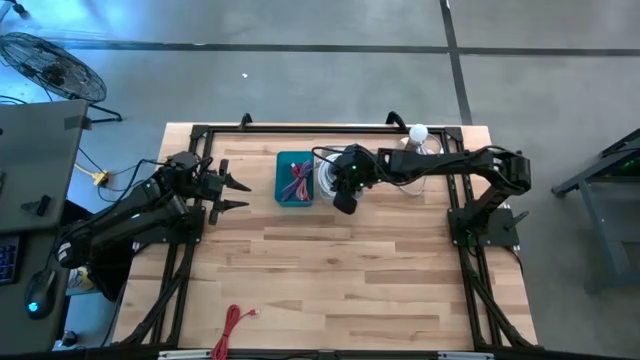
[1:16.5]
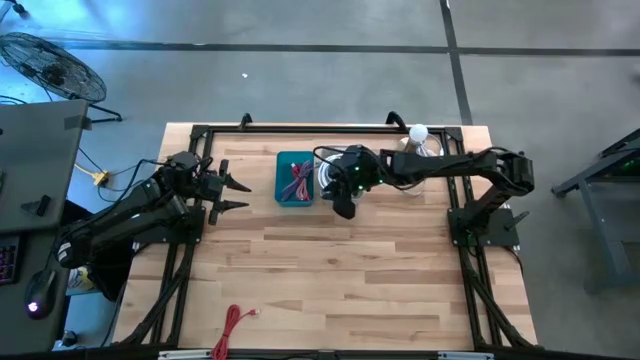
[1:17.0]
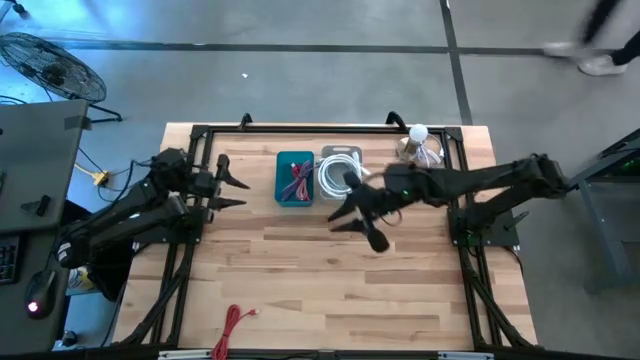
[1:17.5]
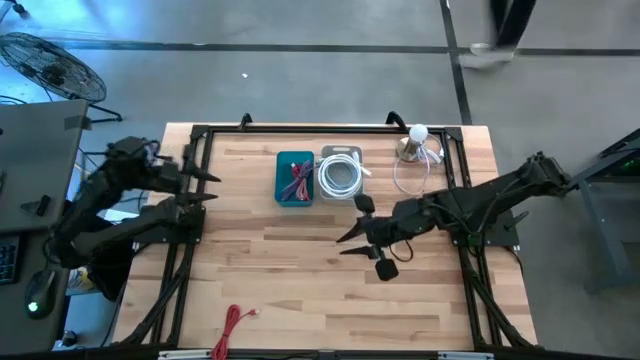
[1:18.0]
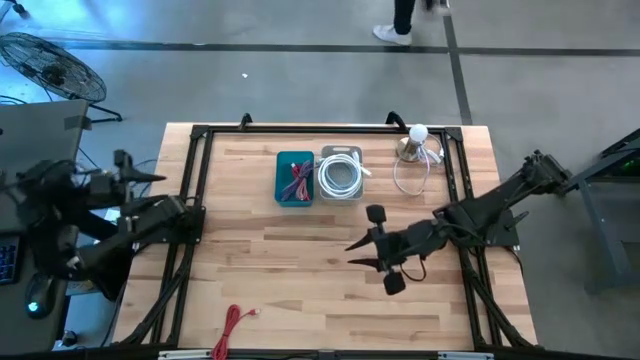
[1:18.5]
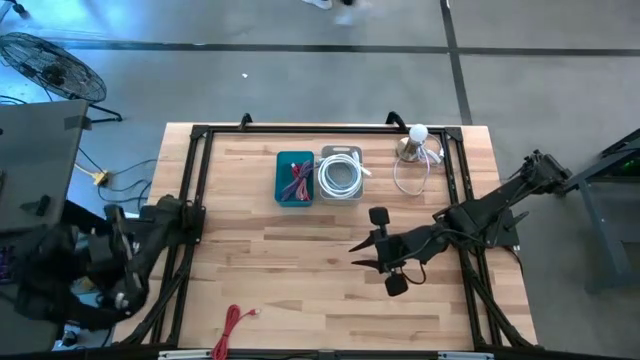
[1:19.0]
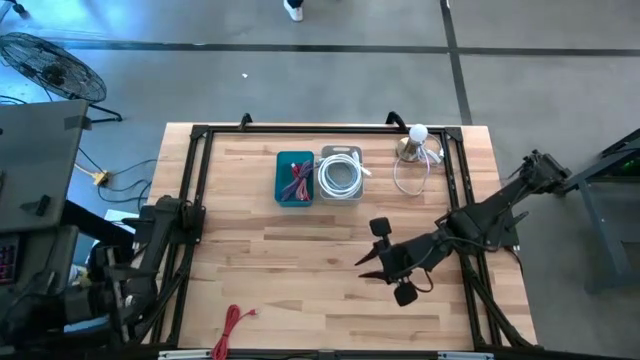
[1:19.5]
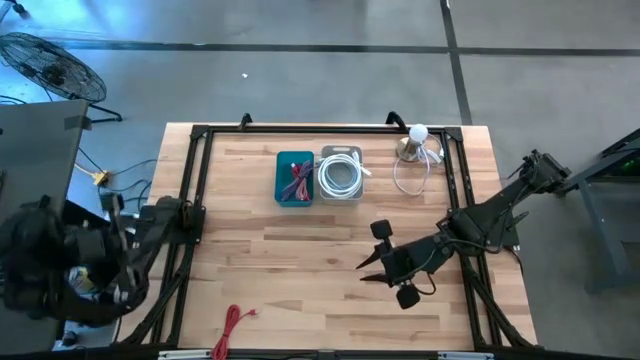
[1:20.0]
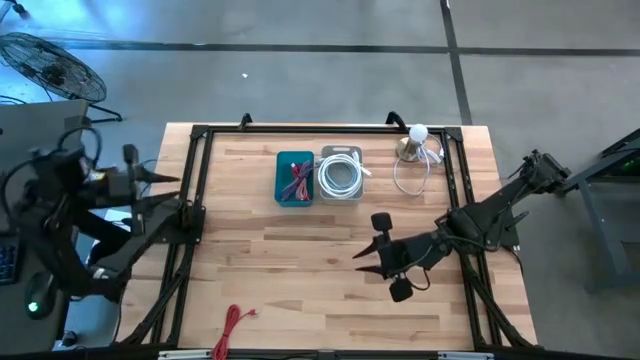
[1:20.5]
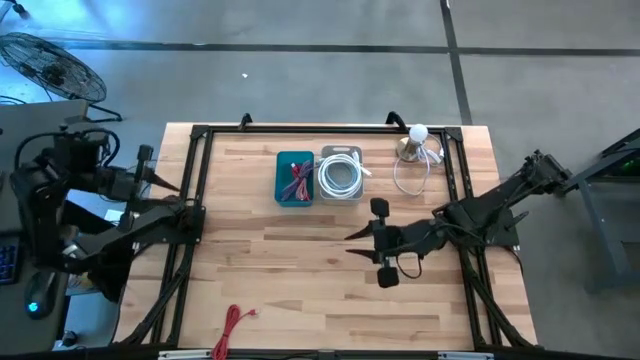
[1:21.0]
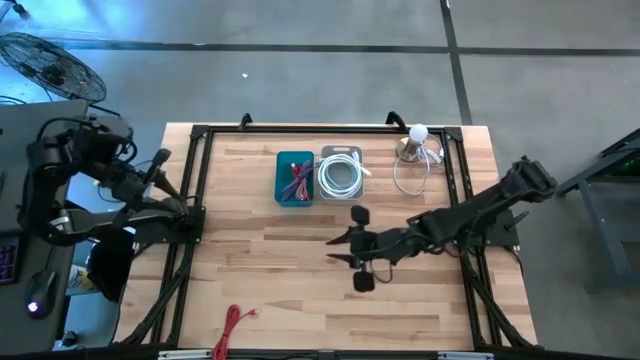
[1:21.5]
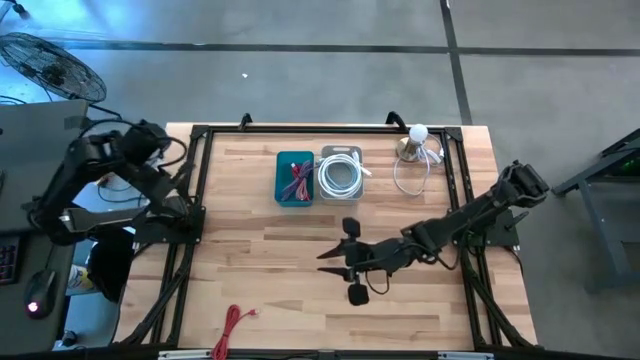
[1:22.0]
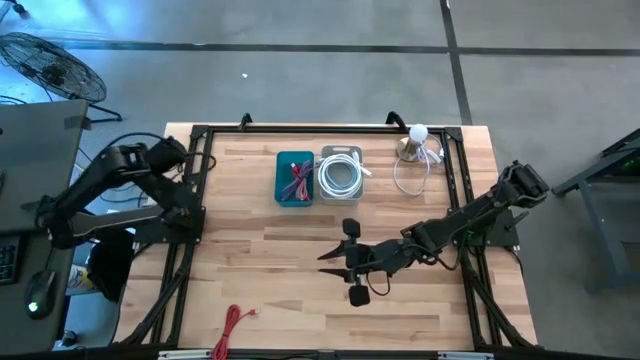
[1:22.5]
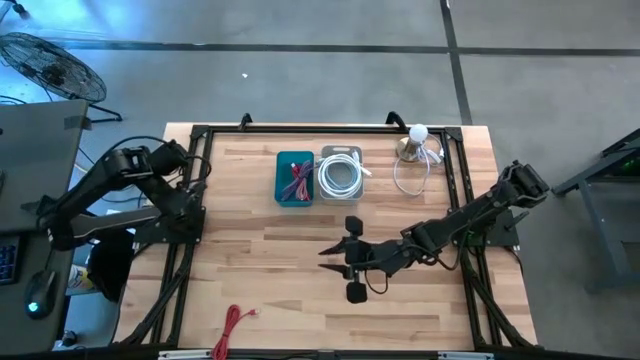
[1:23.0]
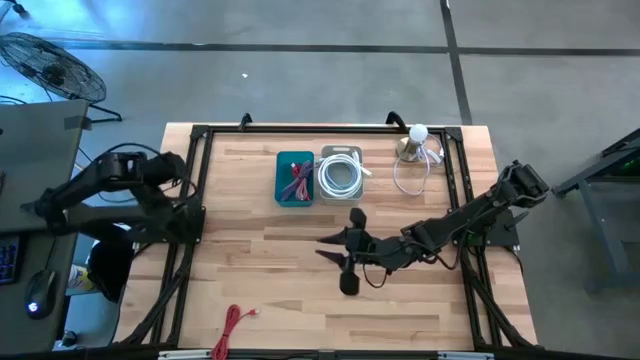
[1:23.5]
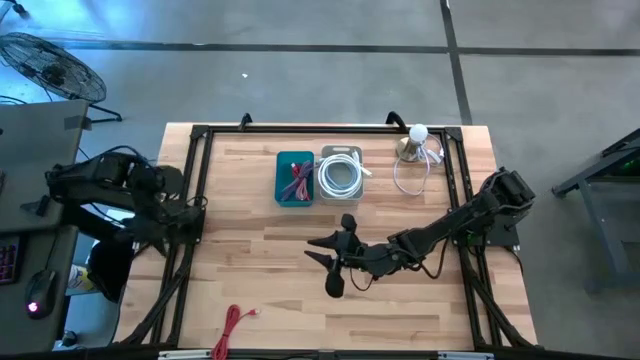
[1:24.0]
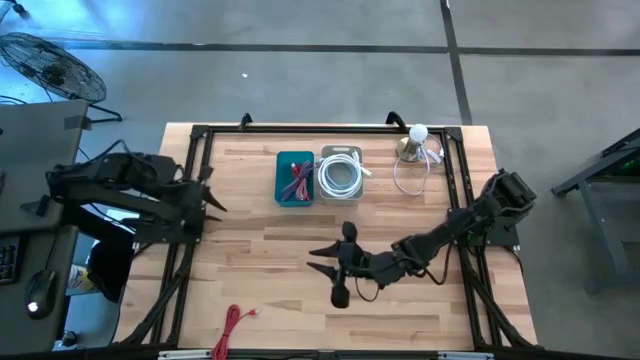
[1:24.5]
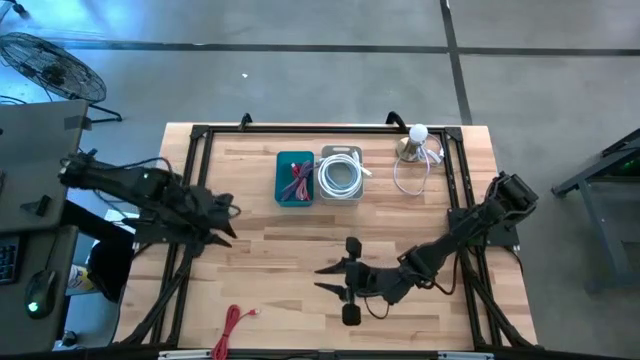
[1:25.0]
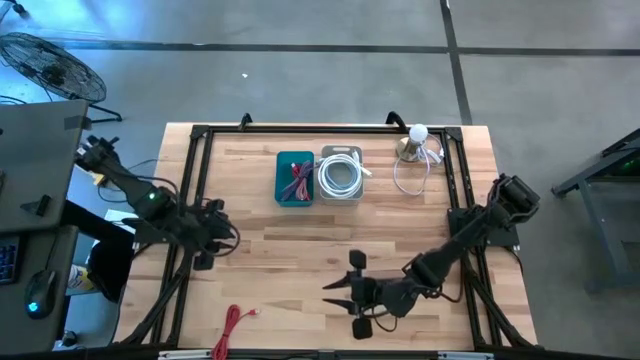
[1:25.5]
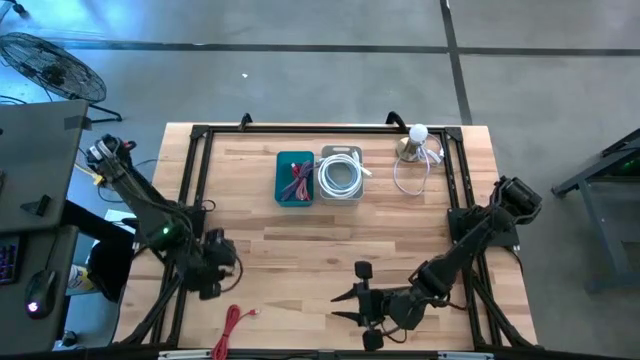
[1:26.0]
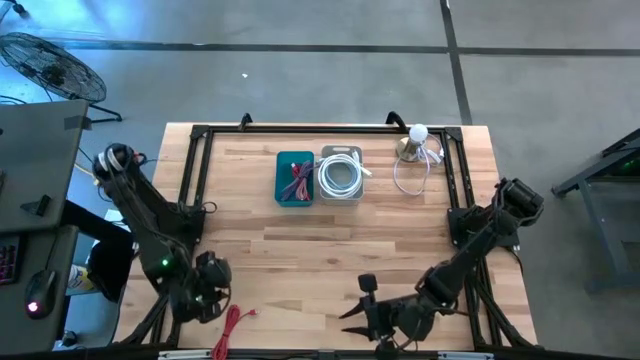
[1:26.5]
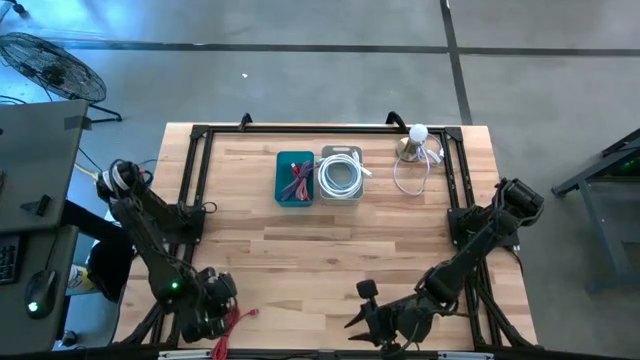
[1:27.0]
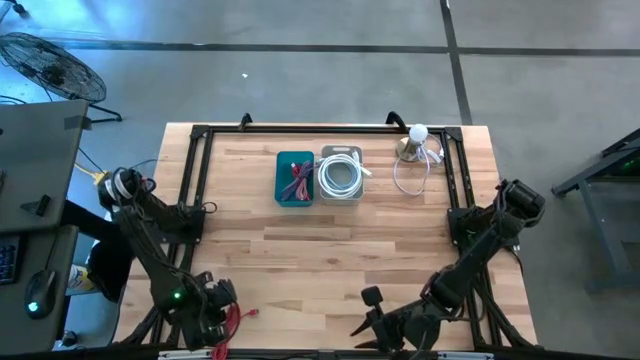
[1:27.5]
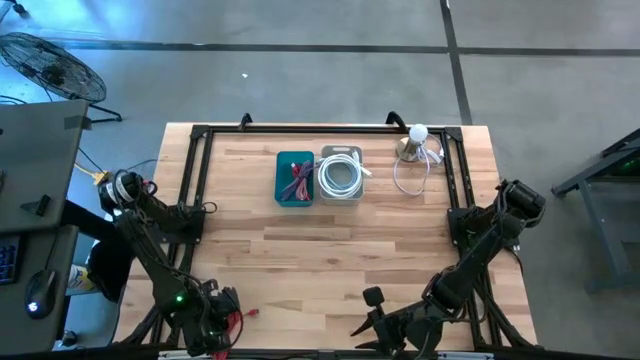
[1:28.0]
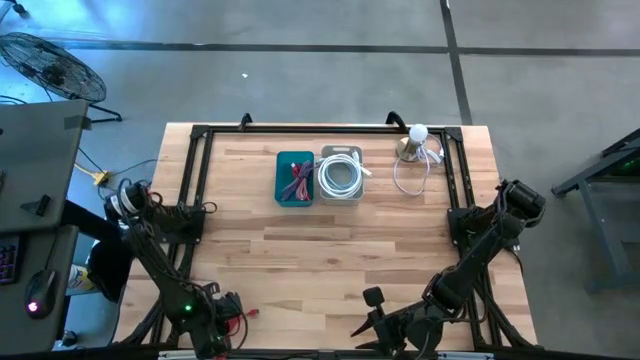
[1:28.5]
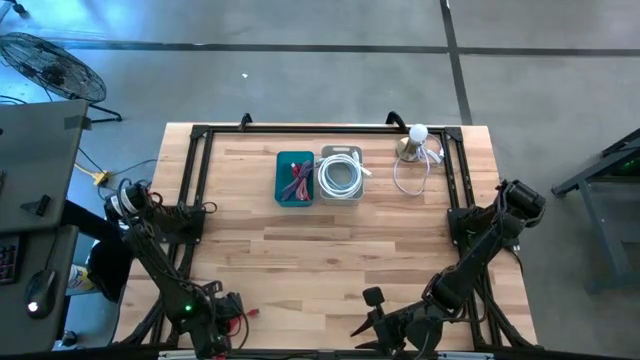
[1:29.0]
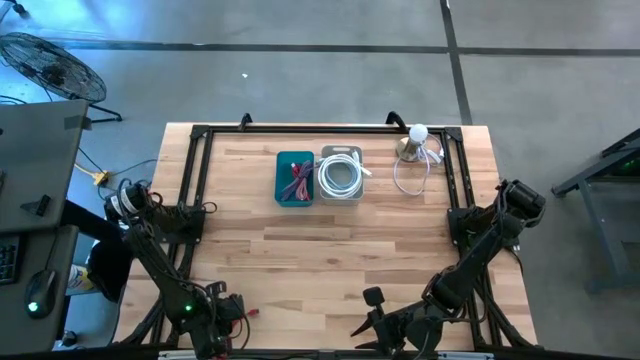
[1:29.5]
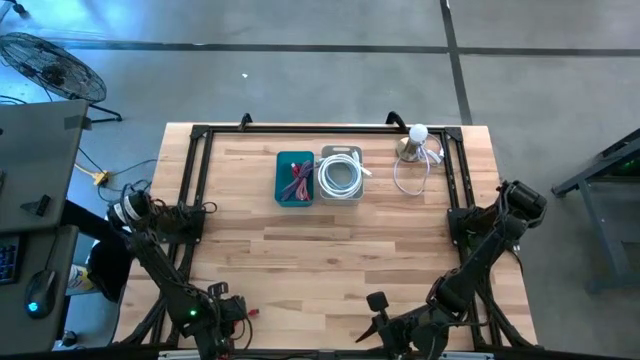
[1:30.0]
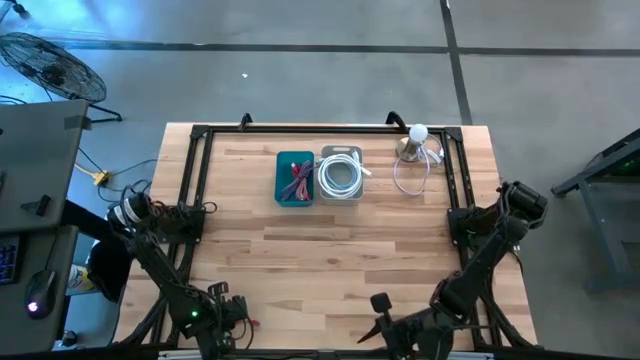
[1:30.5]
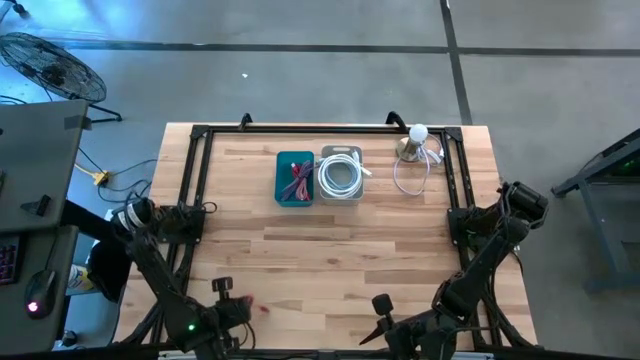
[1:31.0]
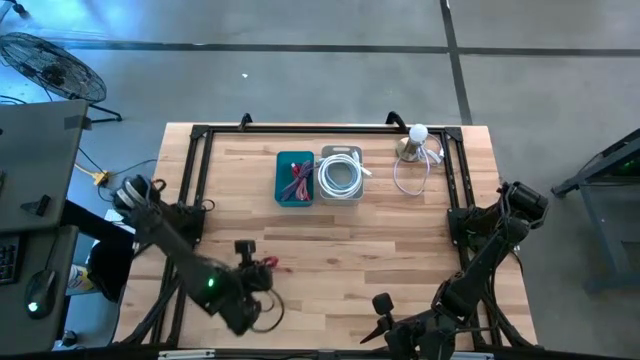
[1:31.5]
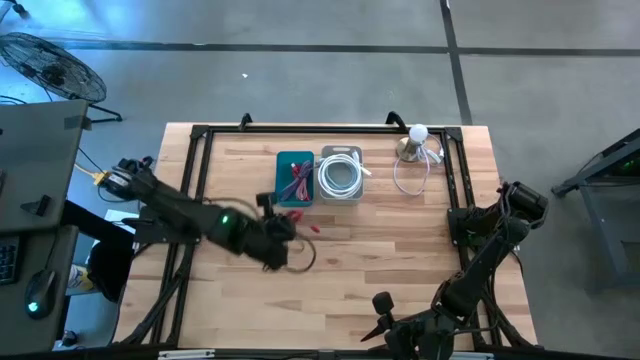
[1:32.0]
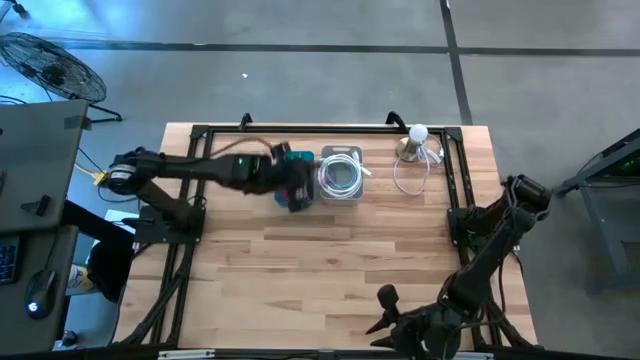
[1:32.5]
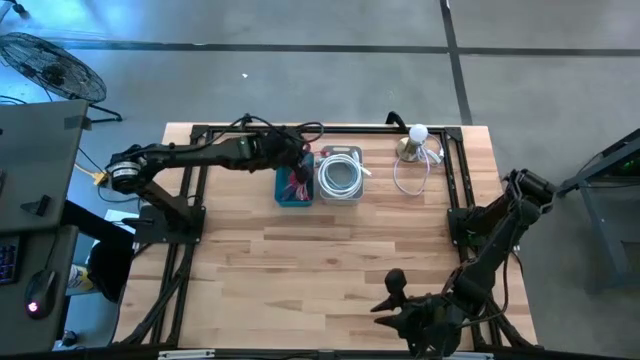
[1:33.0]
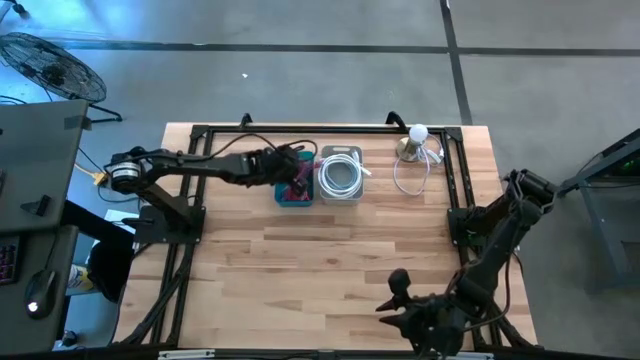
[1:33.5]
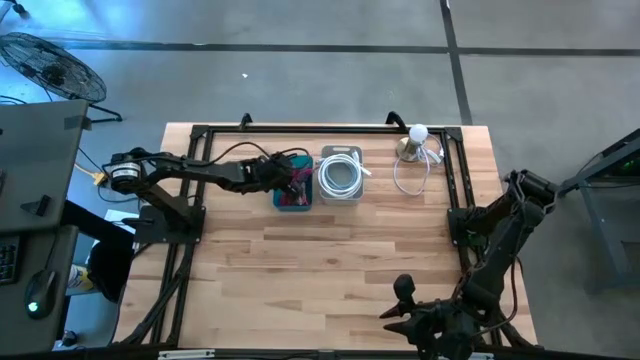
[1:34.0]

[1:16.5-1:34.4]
Task: Pick & Place USB Port
Put the red charger cable into the blue bin

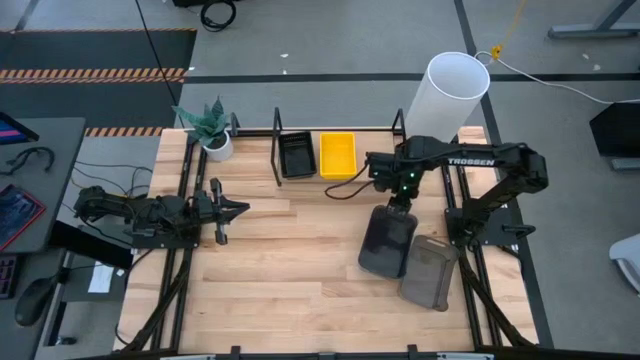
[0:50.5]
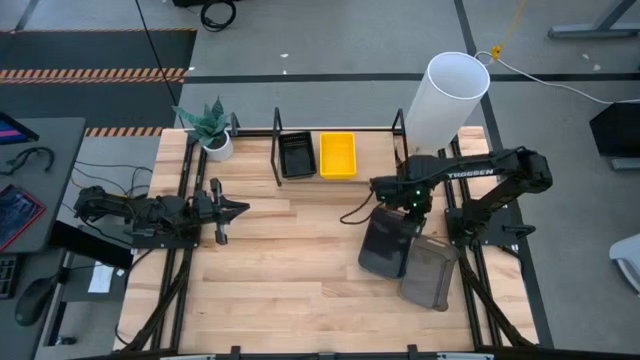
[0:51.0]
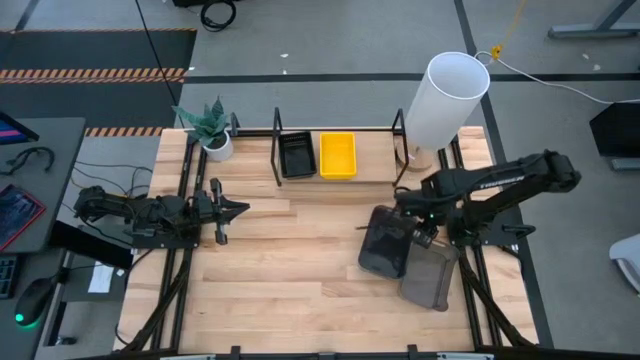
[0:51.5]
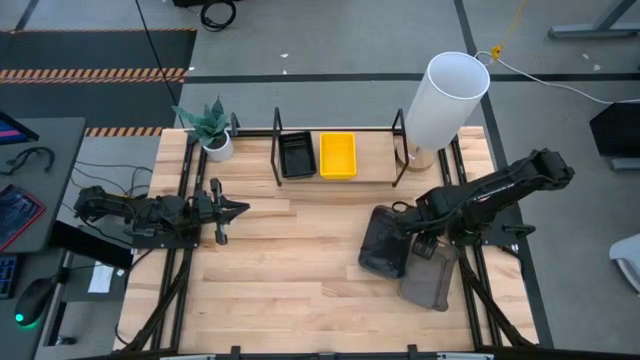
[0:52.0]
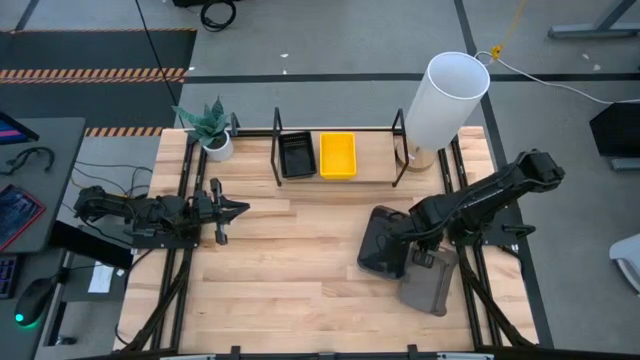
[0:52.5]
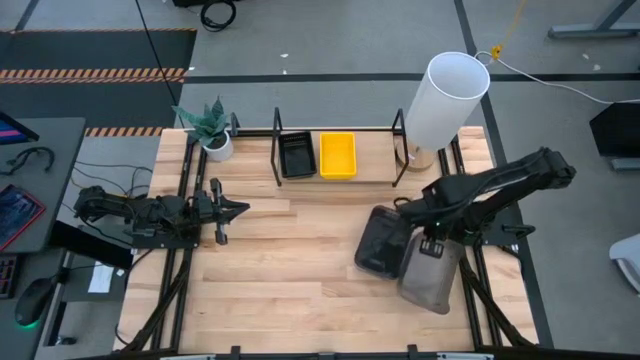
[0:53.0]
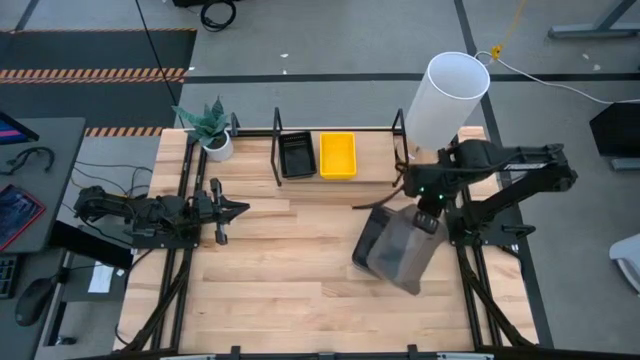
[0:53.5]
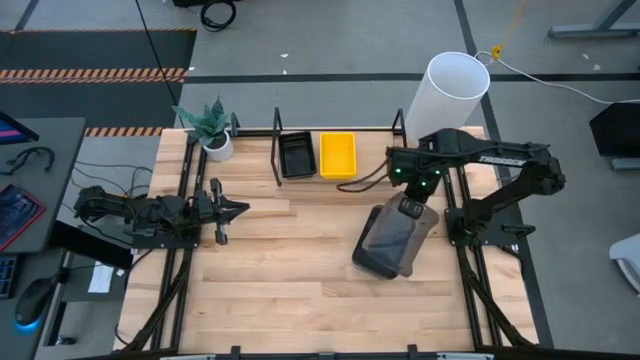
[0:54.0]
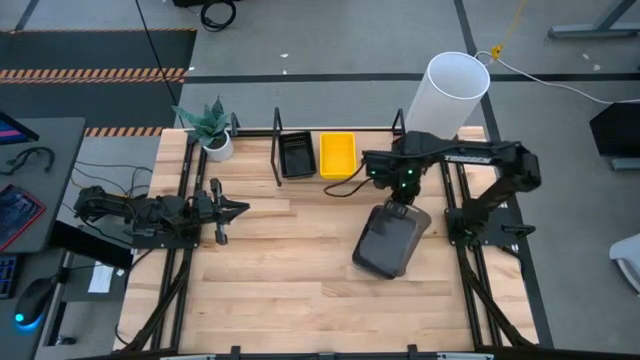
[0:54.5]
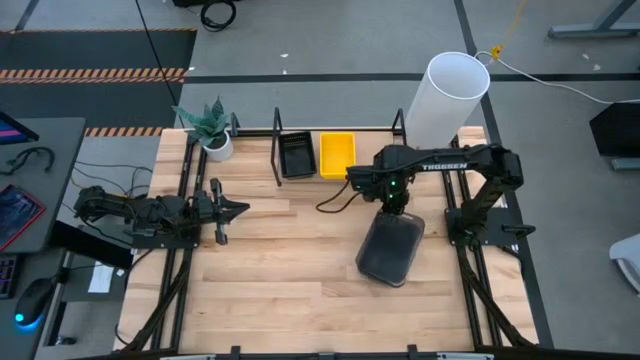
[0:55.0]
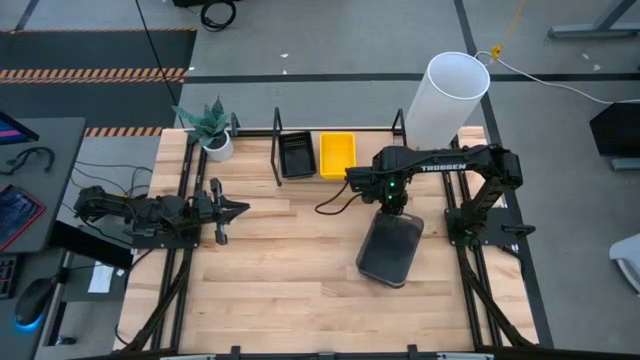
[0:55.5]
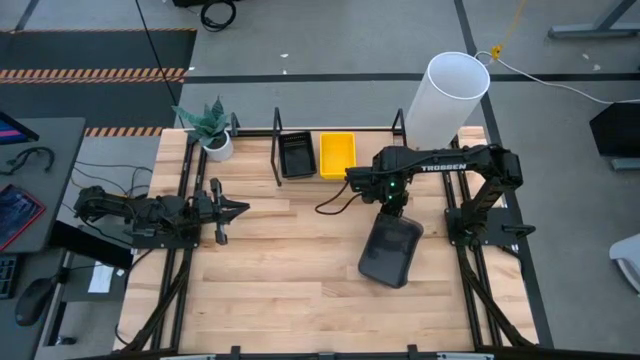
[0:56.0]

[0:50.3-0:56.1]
Task: Stack baskets on shelf by color
Stack the right black transparent bin on top of the black transparent bin
